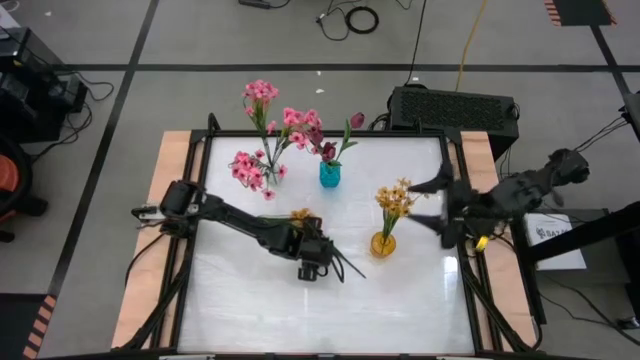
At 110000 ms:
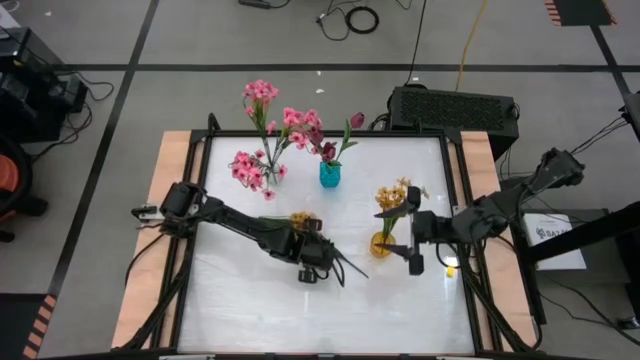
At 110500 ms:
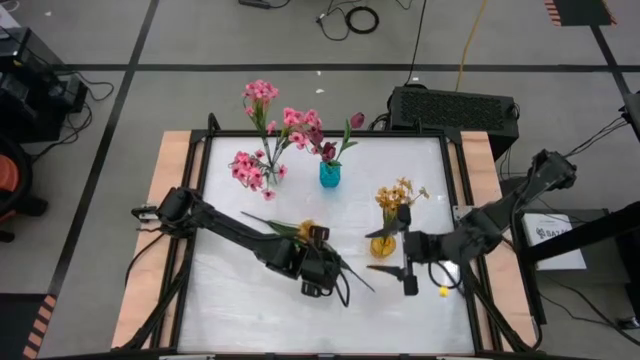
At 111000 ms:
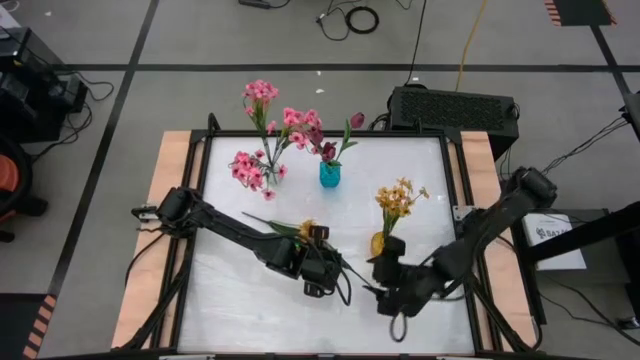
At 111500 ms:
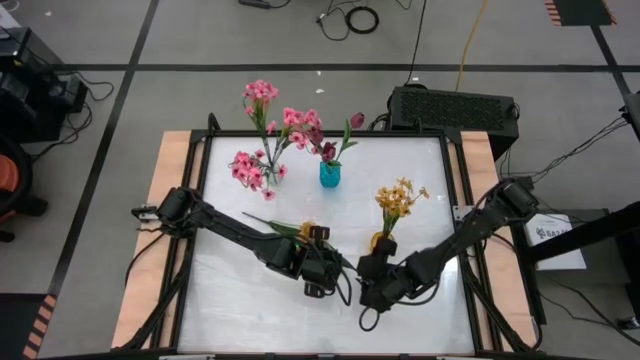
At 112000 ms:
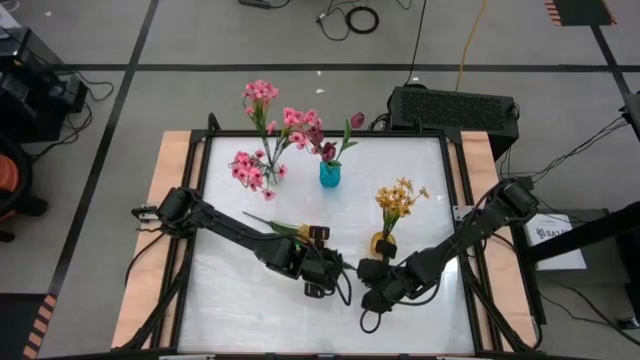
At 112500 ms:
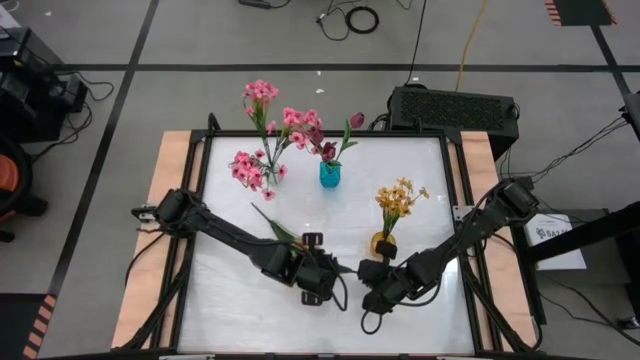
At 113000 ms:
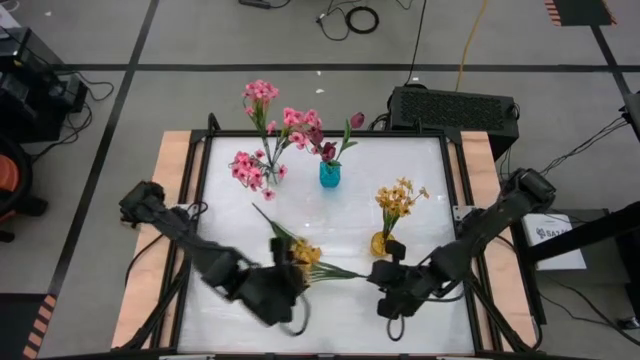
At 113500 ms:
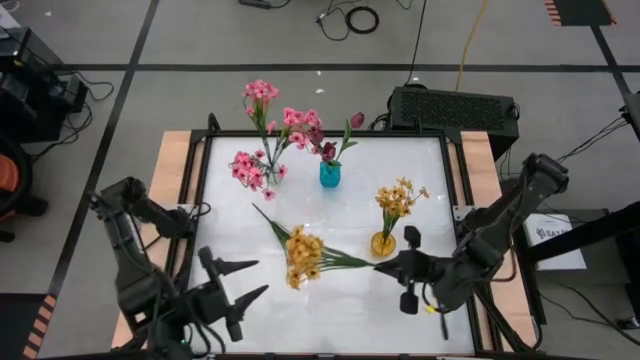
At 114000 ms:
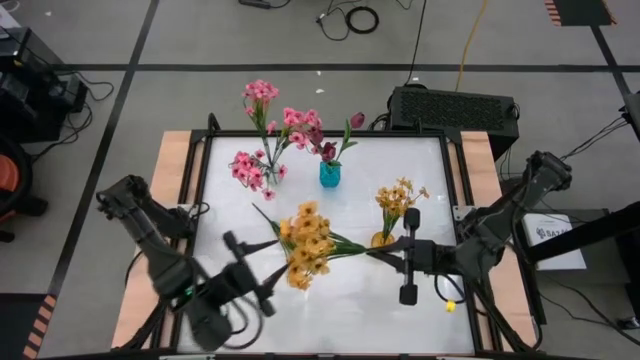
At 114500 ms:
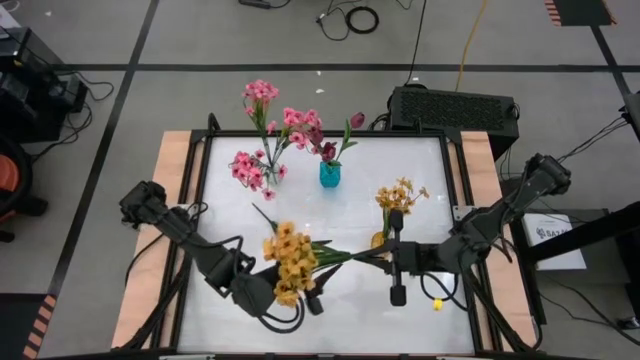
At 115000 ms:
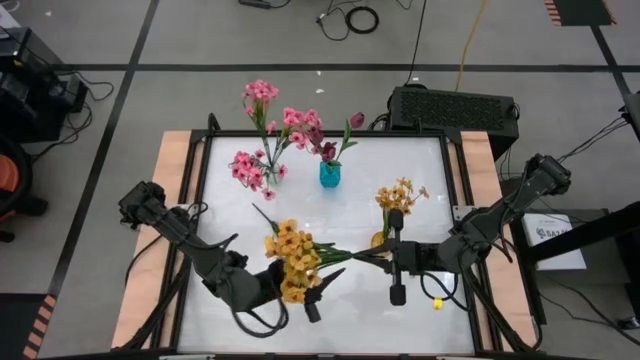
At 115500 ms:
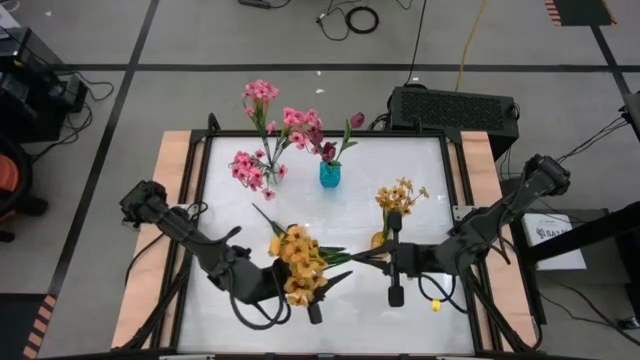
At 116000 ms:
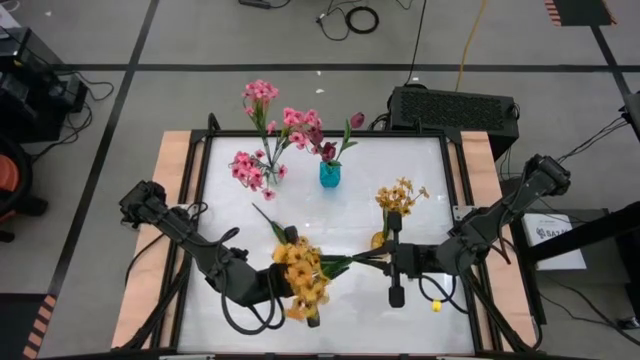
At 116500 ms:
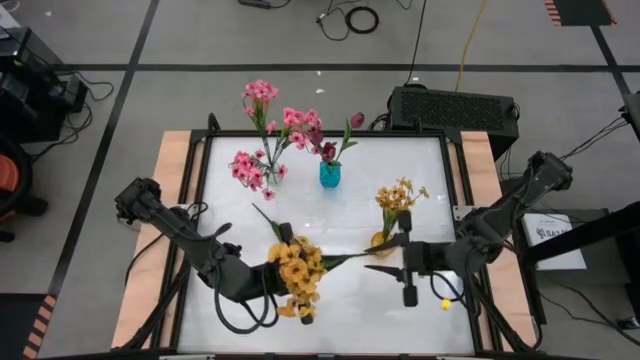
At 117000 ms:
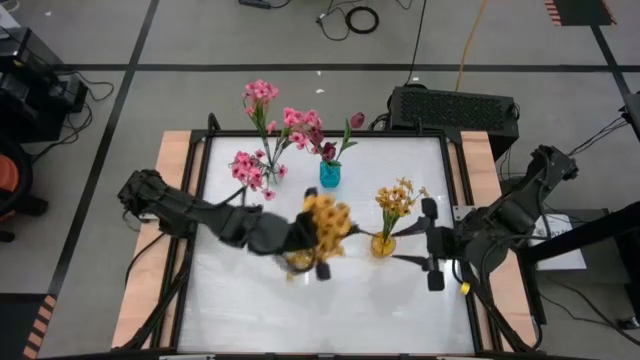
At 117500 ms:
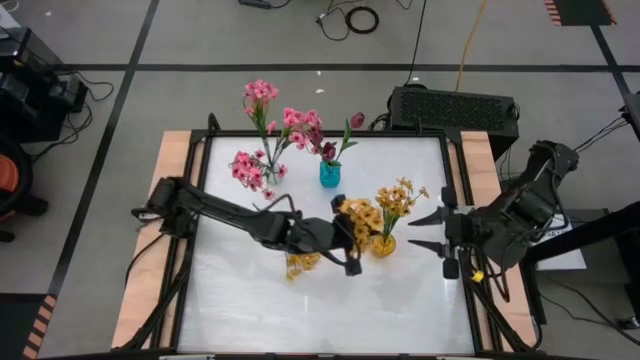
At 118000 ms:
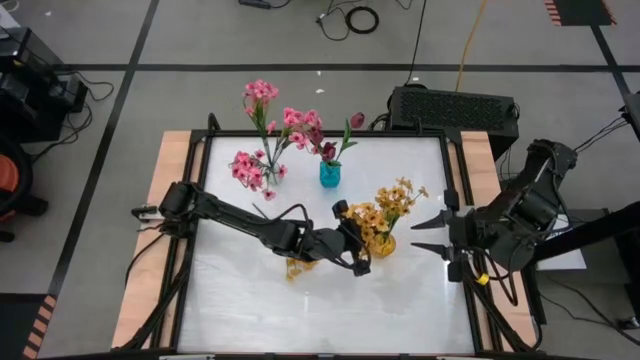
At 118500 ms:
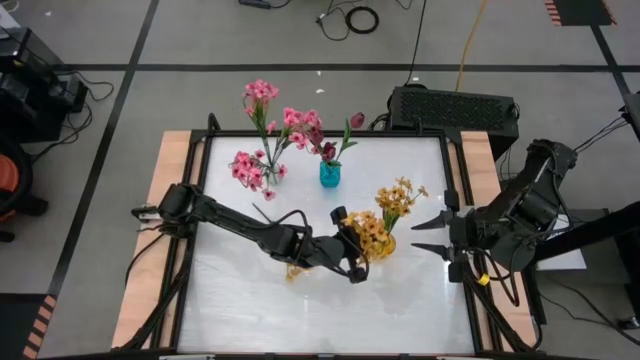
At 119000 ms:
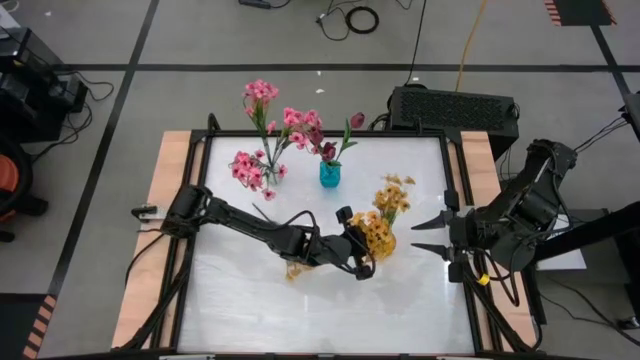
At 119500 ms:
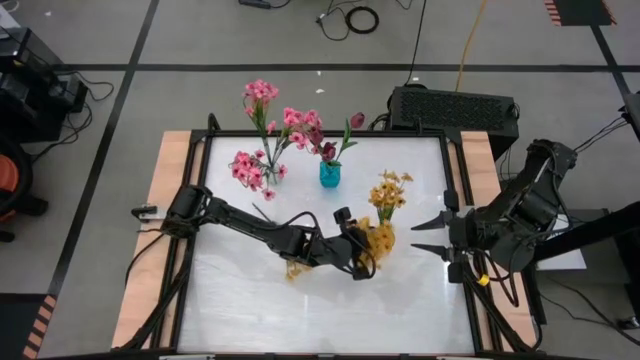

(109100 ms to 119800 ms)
Task: Sort flowers into vase by color
Put the right yellow flowers into the yellow vase

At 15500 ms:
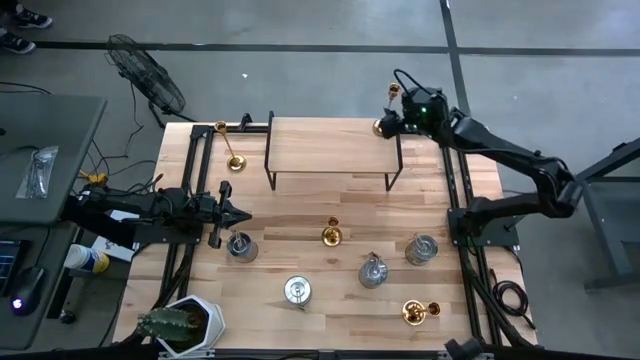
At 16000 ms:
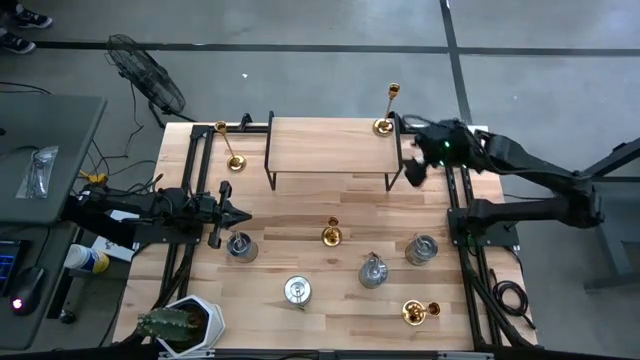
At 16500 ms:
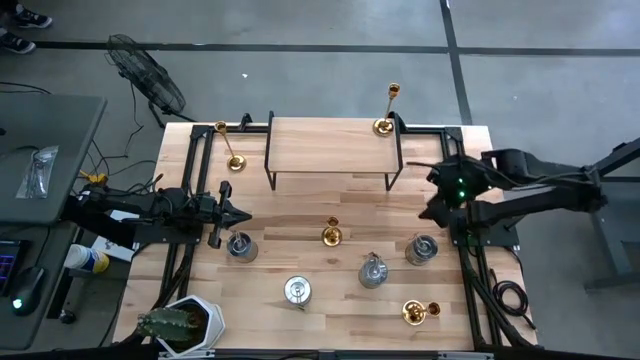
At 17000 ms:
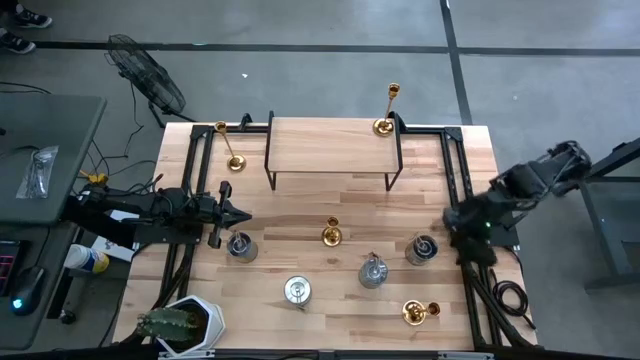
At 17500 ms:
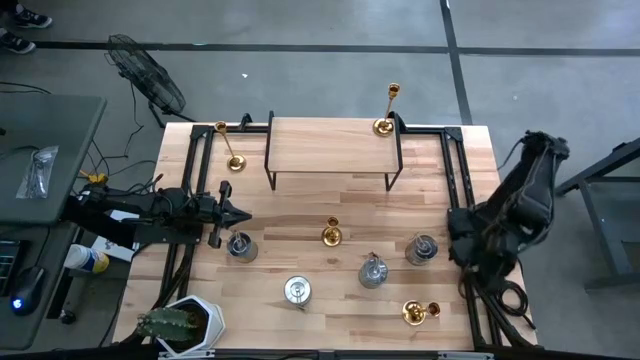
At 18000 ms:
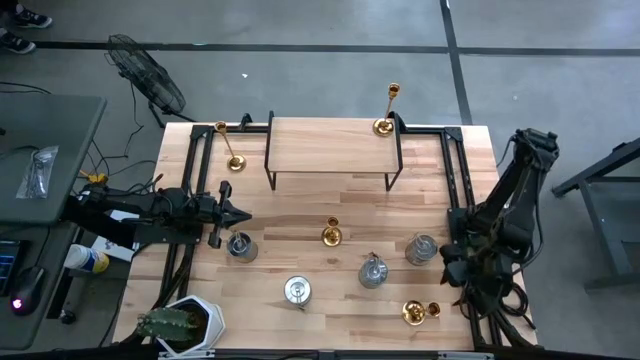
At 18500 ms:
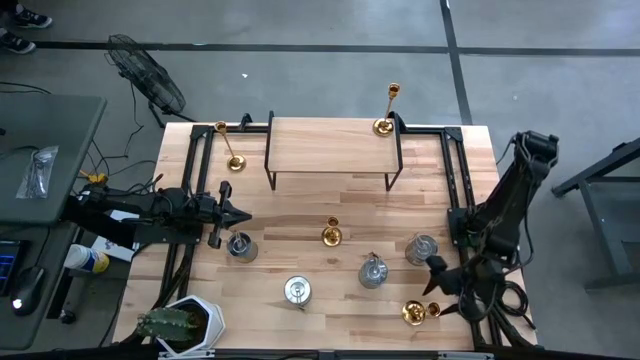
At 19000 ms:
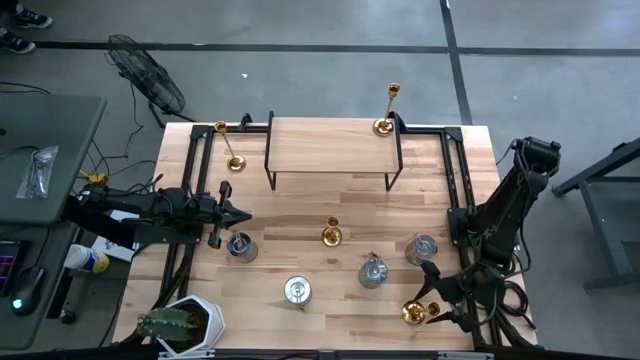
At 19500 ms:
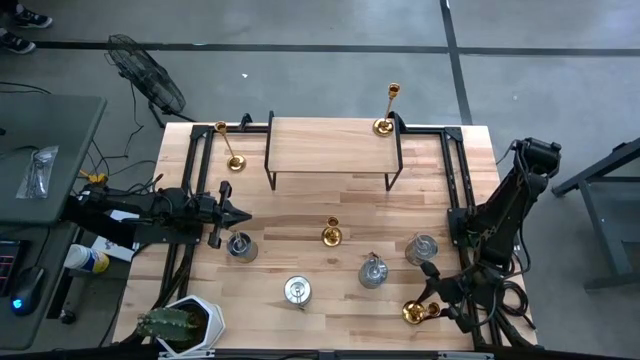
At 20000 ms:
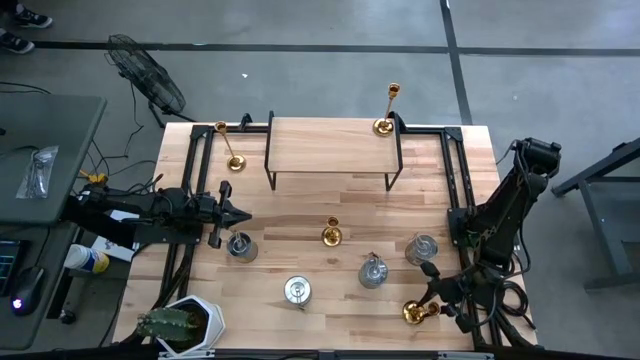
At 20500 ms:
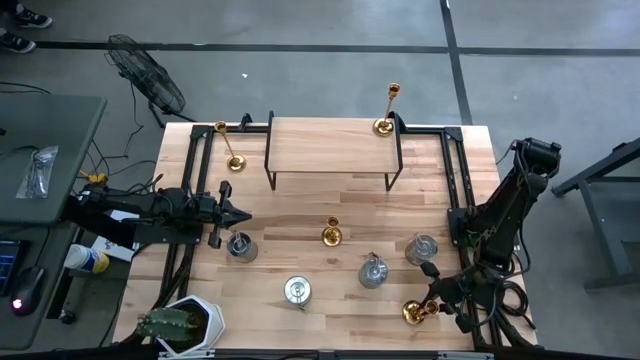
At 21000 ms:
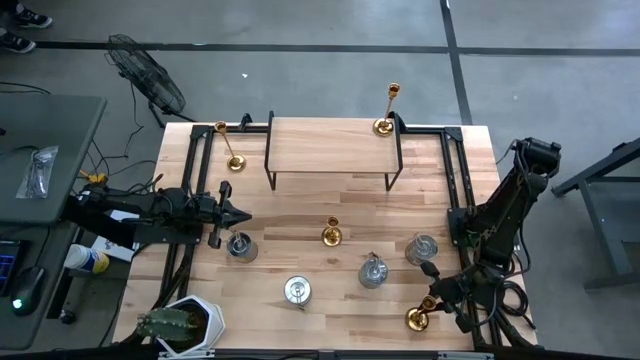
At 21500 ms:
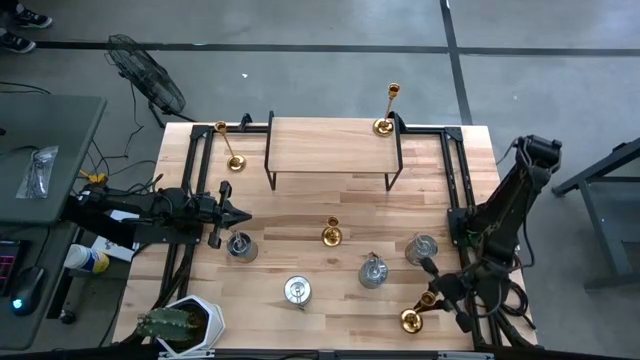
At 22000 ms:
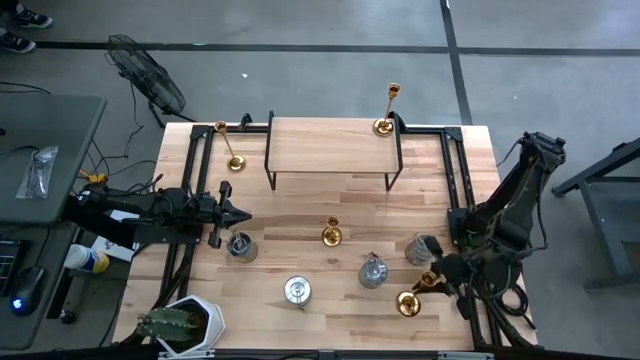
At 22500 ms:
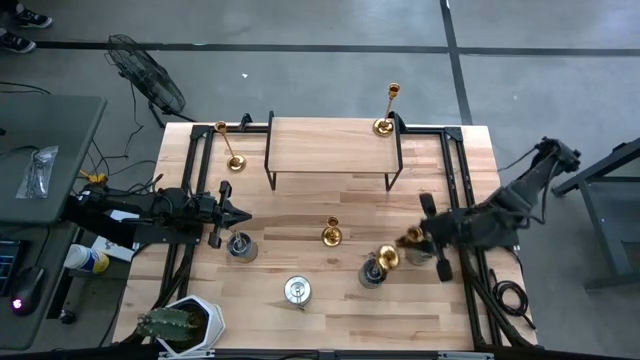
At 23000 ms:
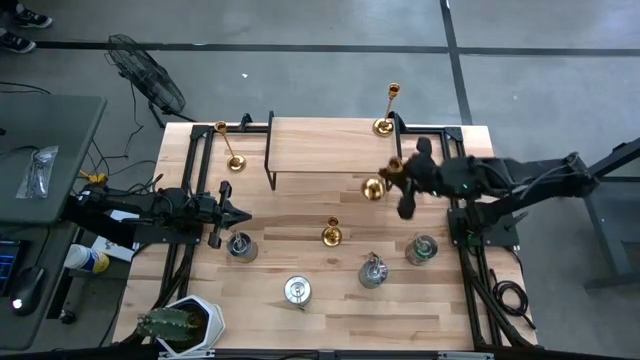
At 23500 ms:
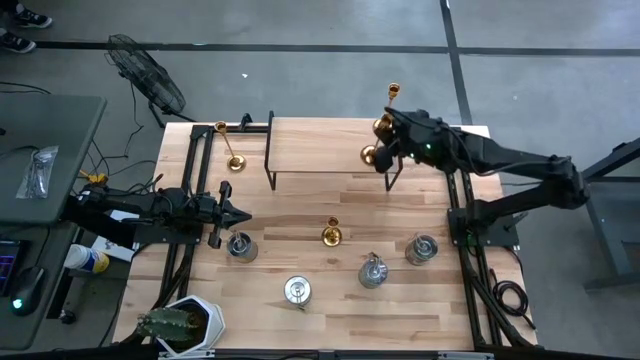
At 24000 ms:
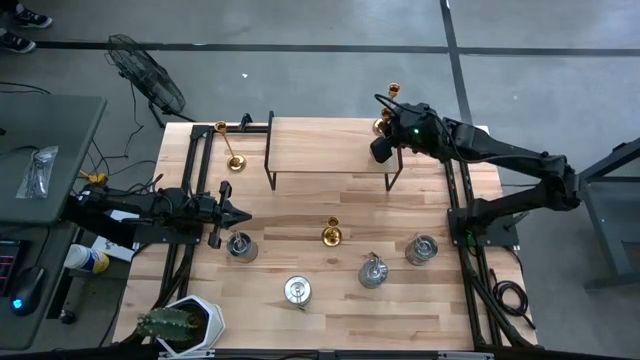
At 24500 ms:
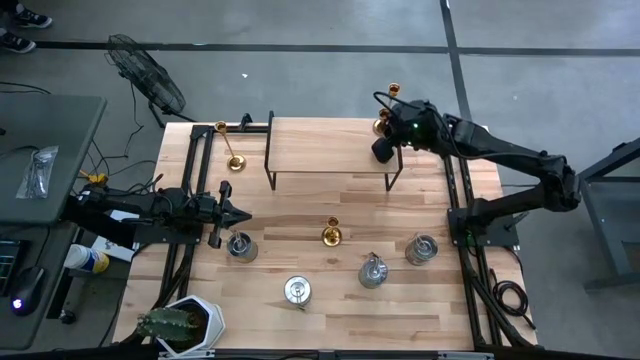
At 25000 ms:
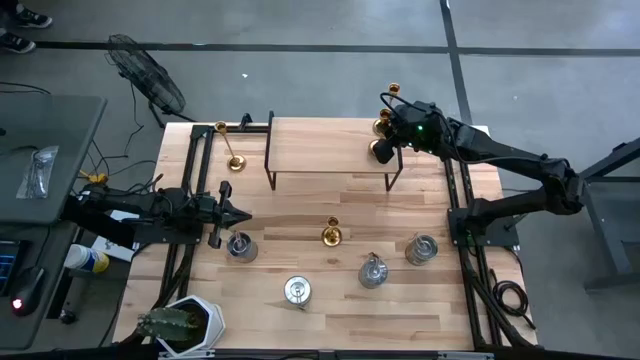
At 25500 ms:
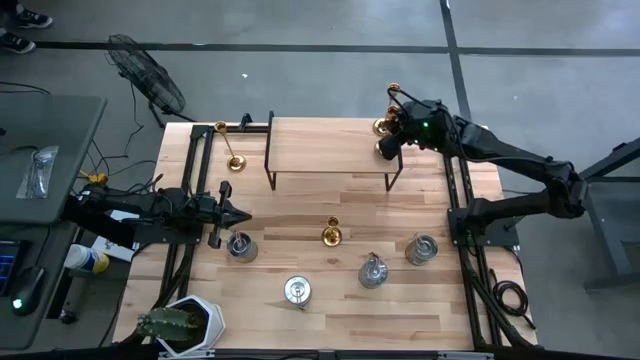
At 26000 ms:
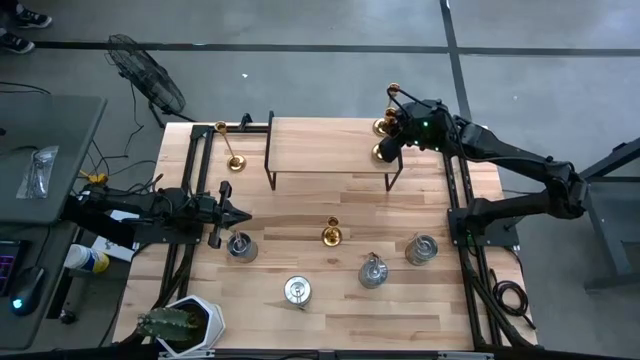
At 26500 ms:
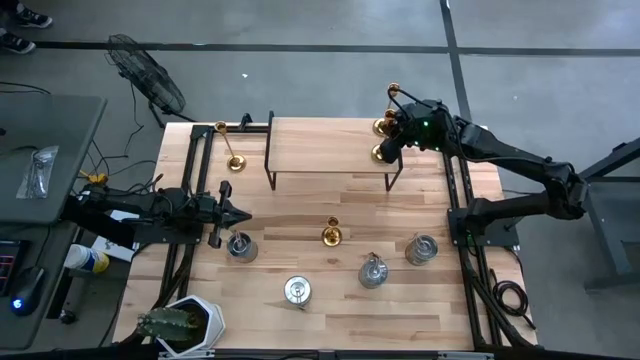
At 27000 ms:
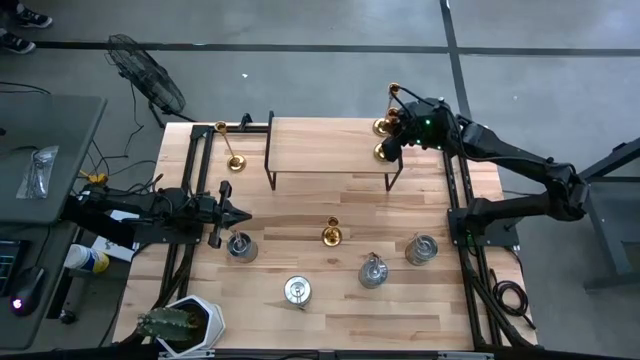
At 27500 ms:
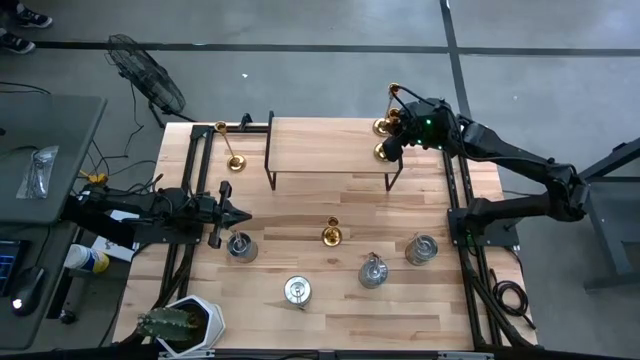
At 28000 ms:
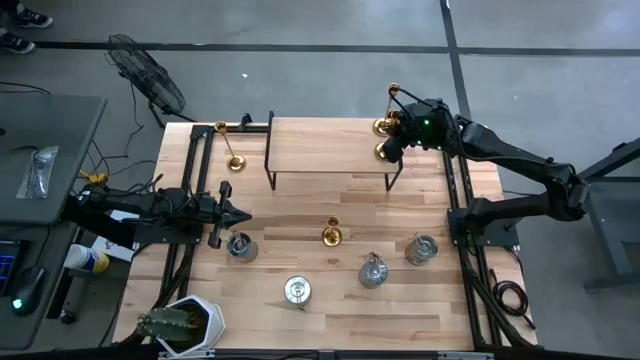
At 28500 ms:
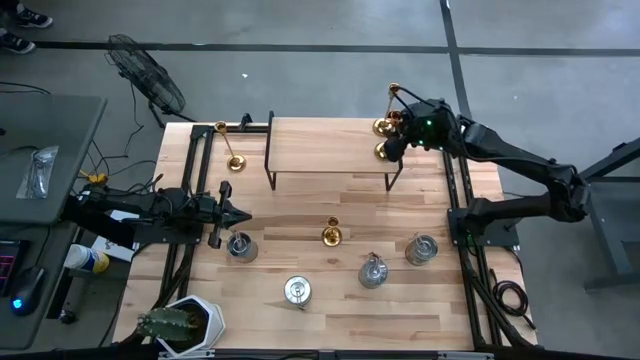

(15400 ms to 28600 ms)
Task: Pick & Place candle stick holders
Put the gold candle holder on the shelf aligned with the other candle holder
